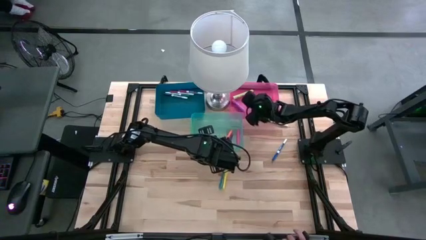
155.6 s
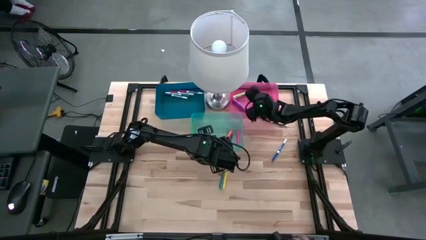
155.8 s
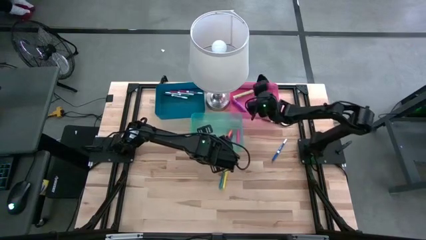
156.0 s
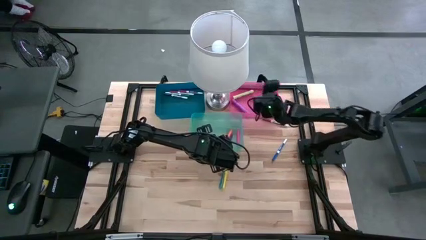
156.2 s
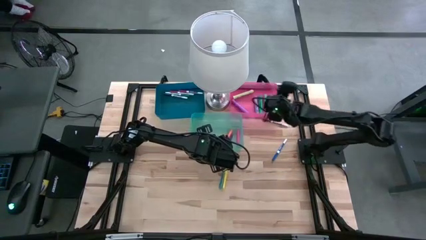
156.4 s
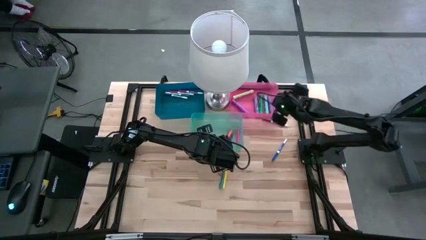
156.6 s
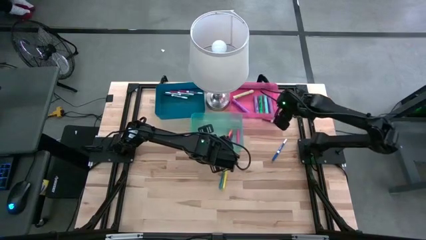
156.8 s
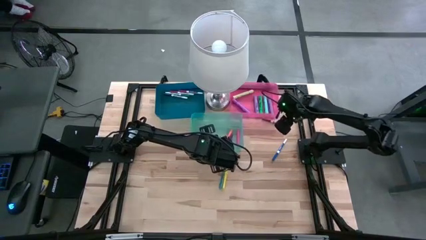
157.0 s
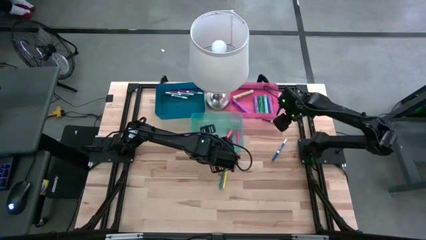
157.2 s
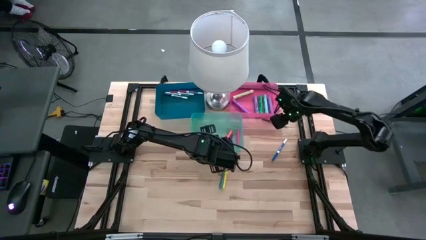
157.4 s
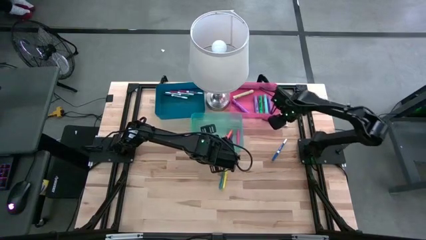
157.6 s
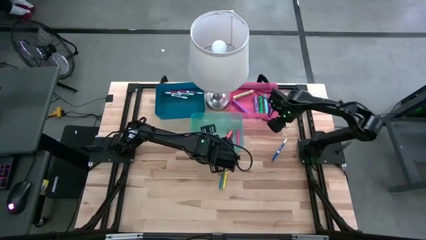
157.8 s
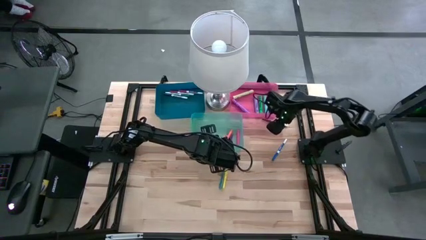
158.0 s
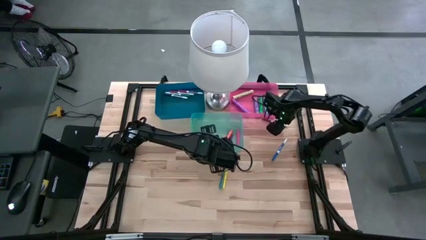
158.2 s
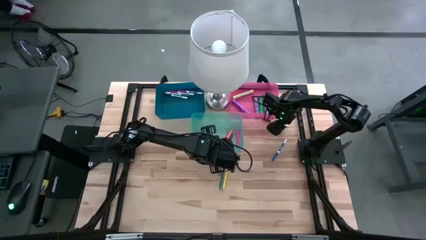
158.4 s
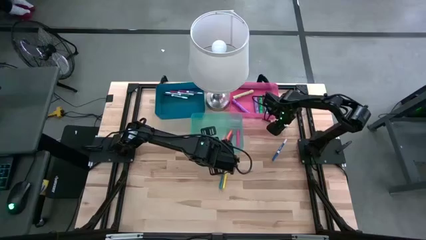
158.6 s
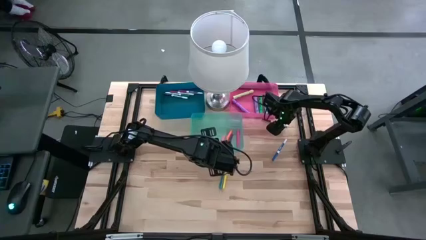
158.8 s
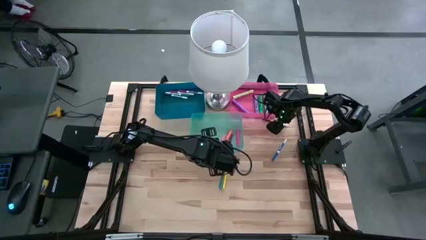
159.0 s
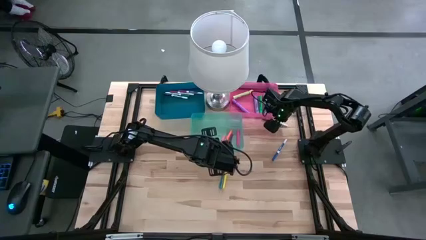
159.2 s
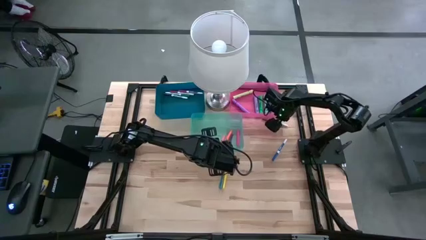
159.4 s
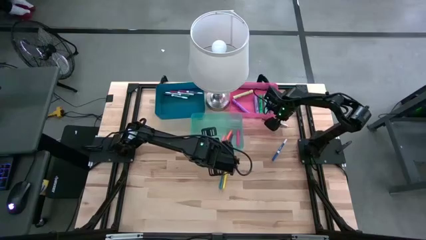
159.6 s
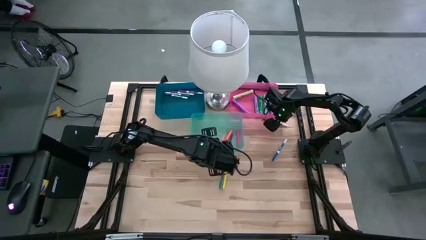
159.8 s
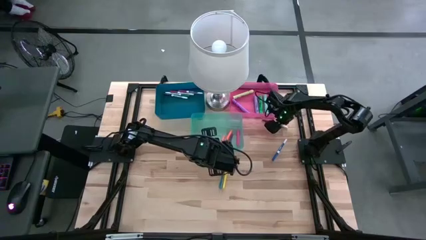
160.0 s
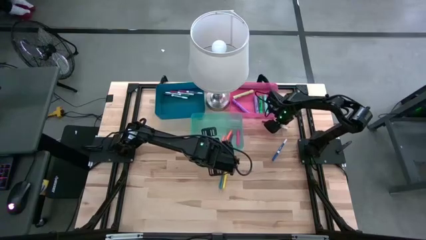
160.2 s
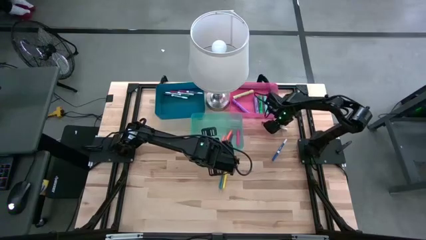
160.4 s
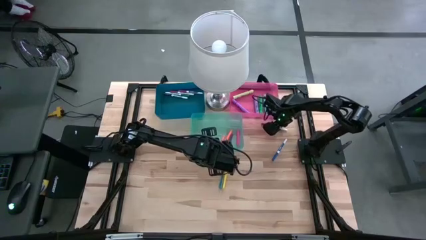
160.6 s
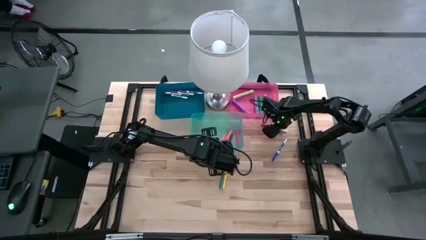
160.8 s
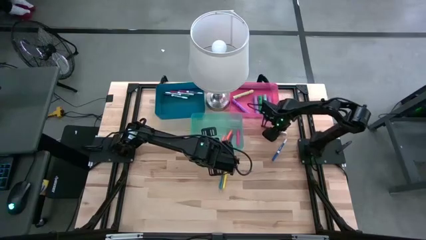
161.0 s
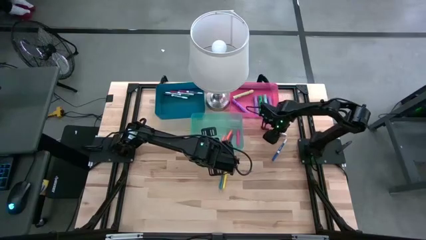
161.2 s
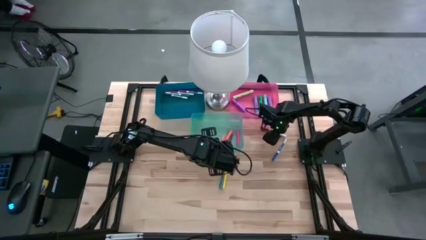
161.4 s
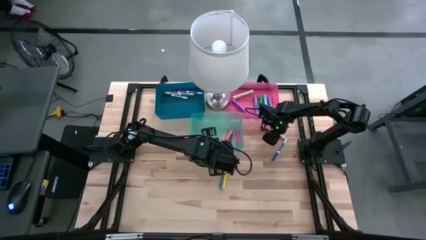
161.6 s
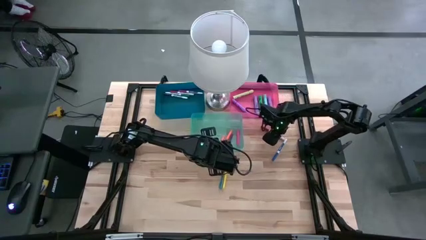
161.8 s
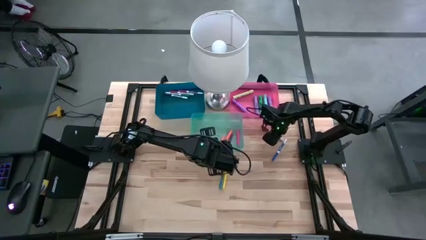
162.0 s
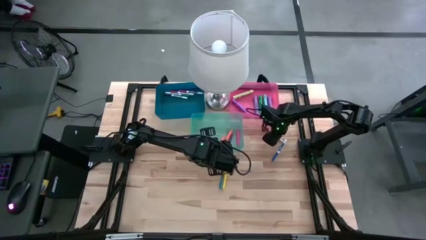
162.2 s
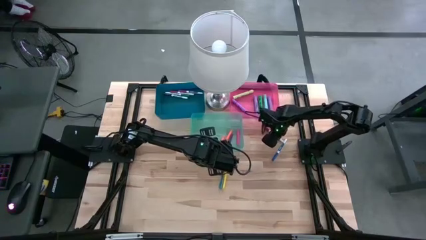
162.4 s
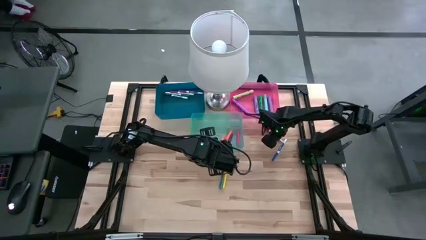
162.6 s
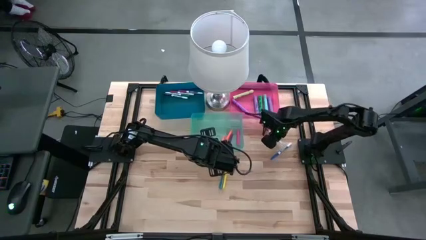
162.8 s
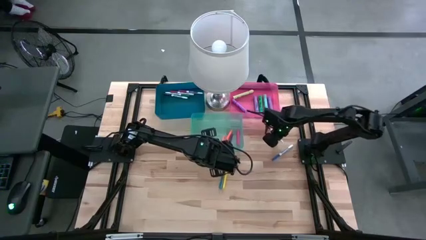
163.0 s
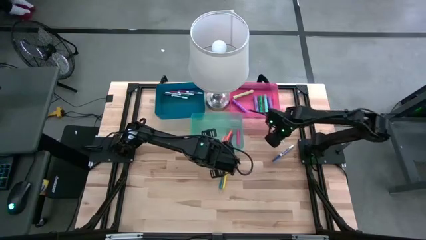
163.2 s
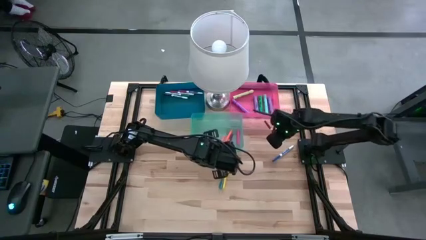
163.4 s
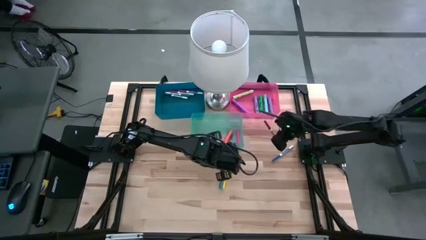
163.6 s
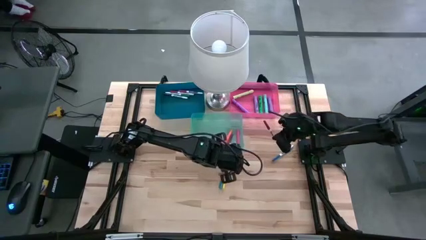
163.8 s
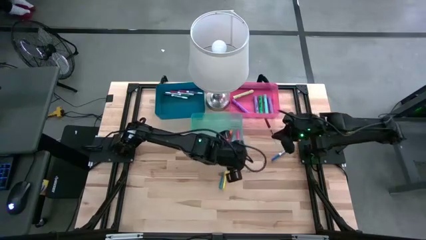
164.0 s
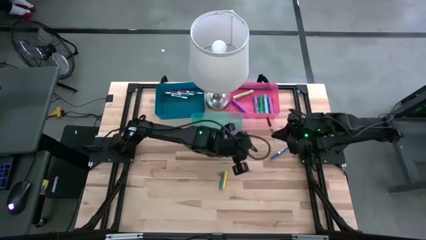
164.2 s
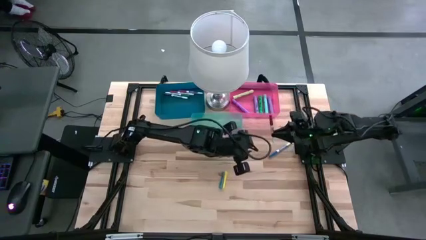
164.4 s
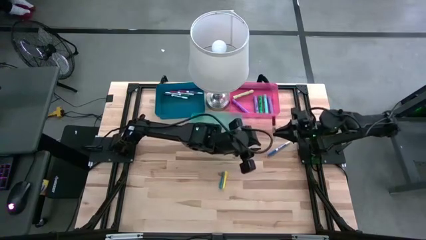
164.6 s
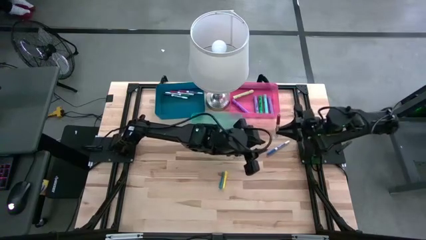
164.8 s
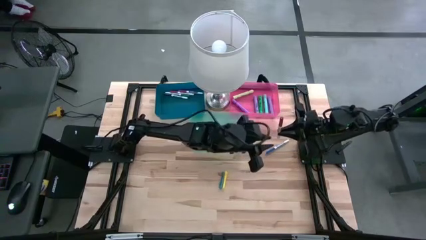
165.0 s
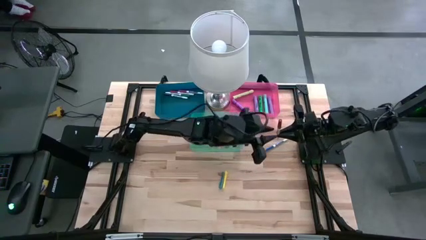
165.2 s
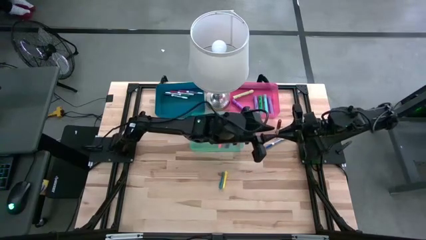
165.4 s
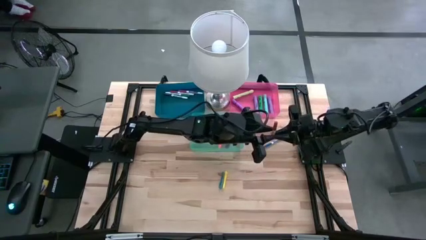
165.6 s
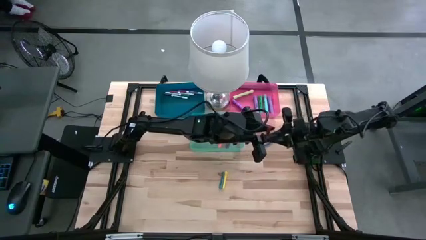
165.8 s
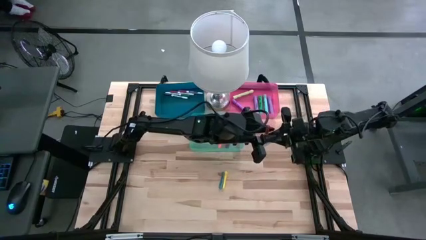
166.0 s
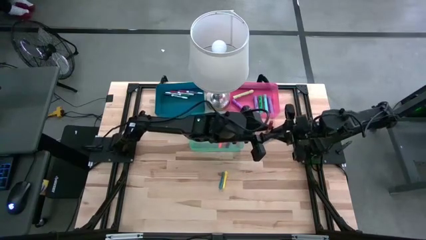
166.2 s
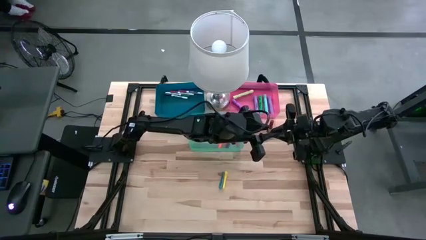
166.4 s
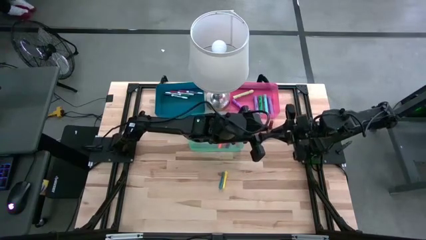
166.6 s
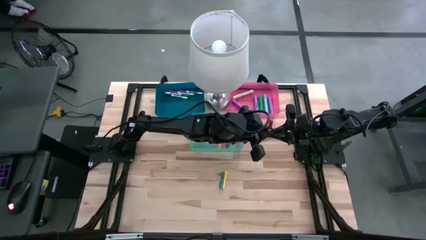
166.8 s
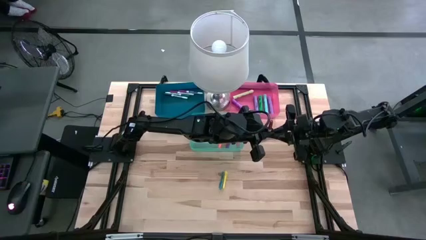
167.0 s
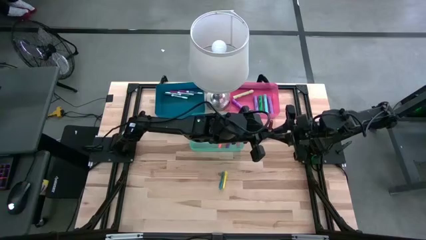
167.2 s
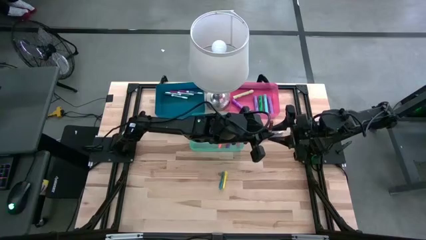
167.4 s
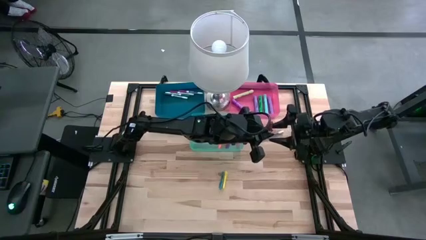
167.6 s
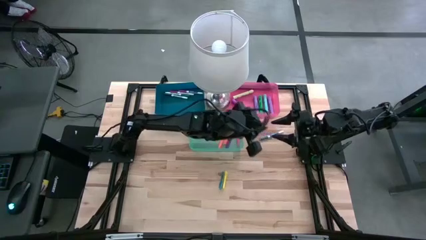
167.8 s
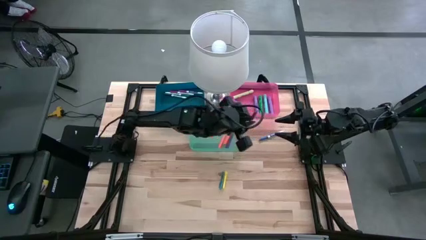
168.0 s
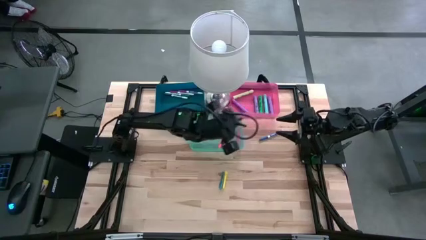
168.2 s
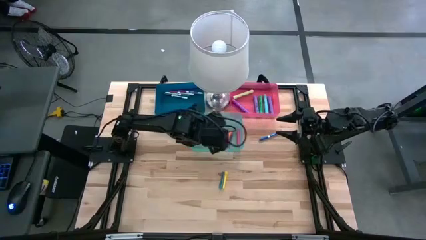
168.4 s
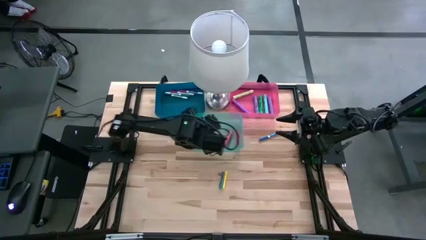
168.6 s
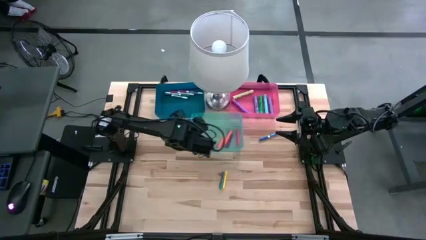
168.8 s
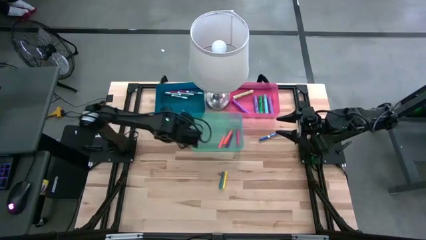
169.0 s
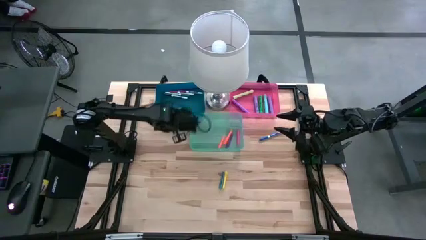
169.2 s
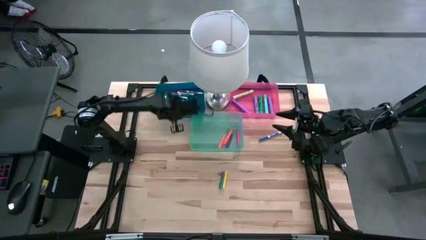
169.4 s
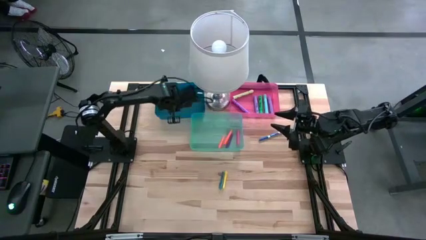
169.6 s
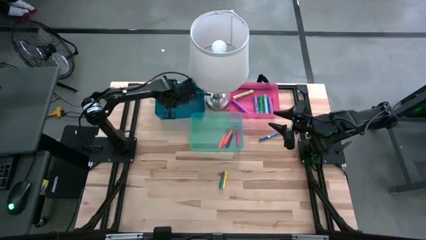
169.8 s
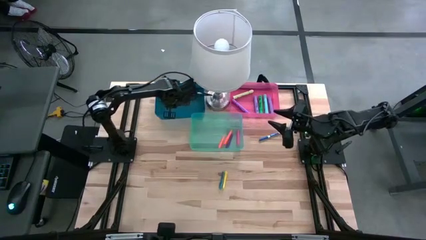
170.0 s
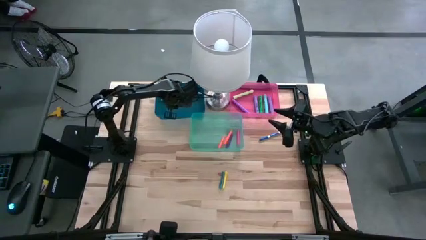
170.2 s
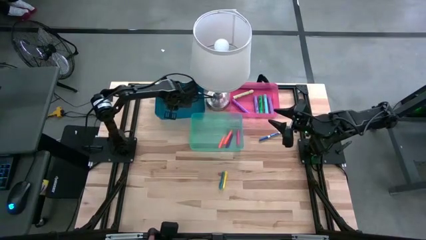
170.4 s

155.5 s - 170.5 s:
Task: Pick & Place Markers
Put the brown marker pen into the blue bin

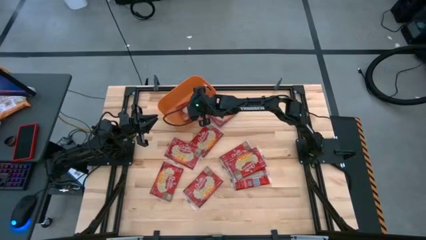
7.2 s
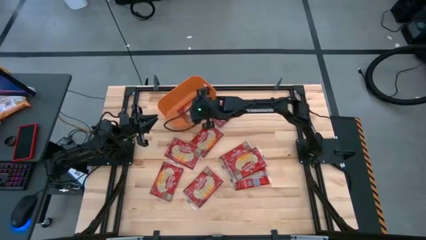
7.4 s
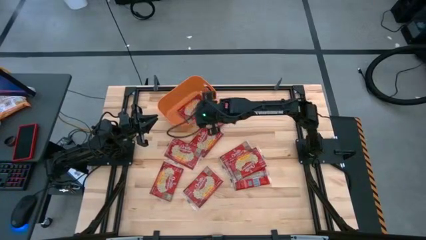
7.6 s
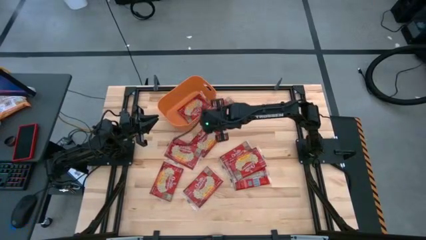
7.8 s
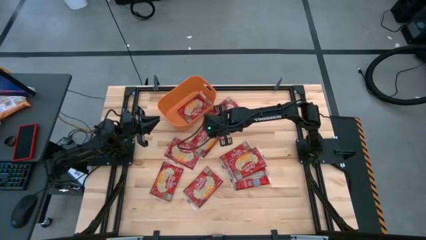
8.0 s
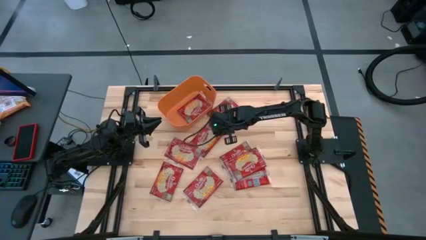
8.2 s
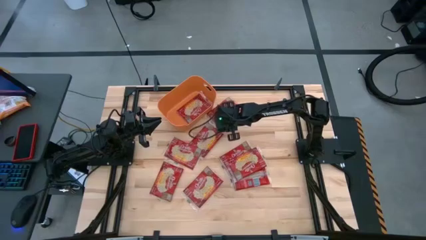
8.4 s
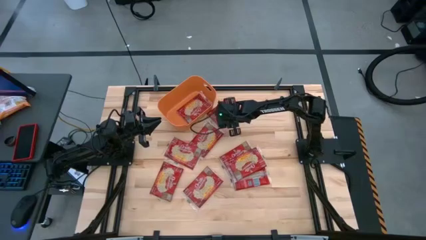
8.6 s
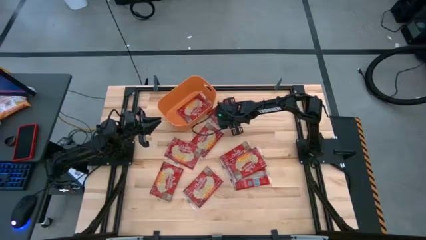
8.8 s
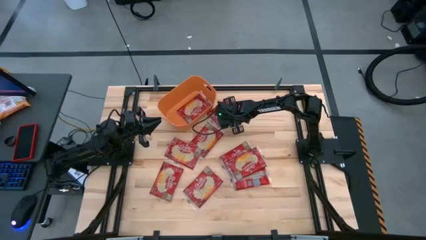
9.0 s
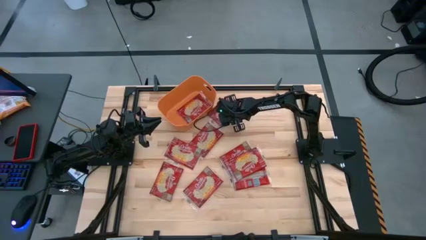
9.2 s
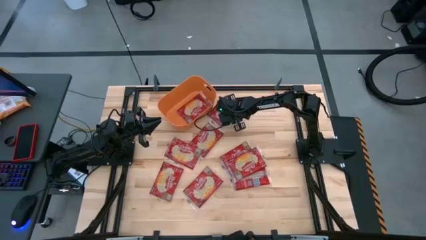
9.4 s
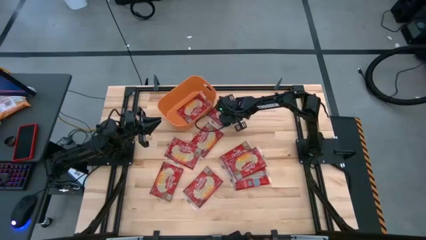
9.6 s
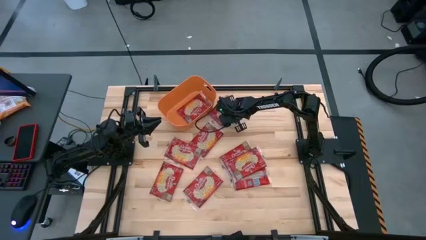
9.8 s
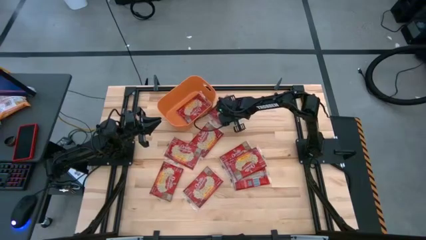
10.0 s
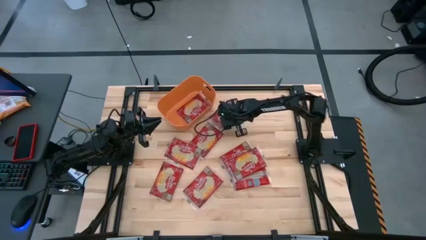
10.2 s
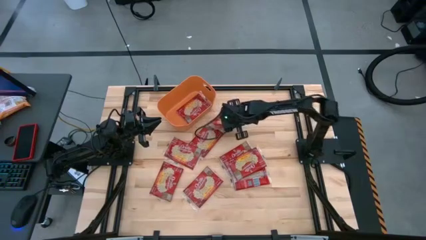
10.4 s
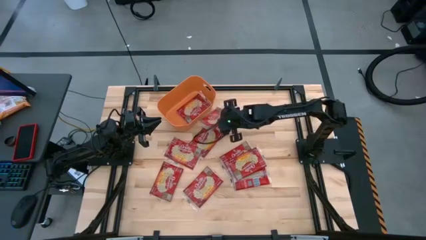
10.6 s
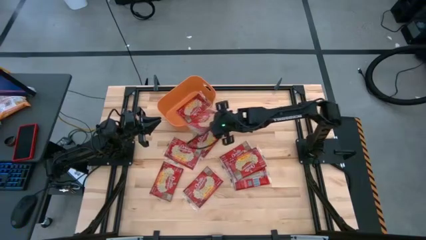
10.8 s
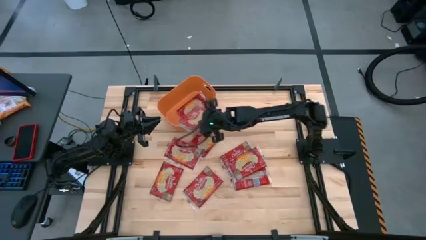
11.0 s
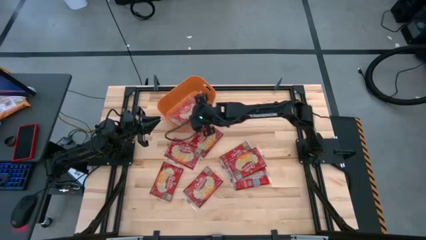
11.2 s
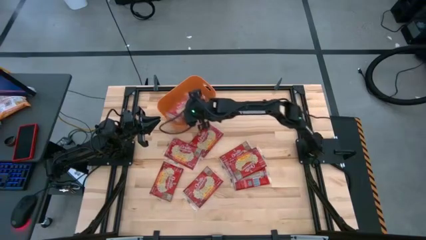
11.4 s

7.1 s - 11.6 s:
Task: Sort popcorn bags into baskets
Put the red popcorn bag into the orange bin
